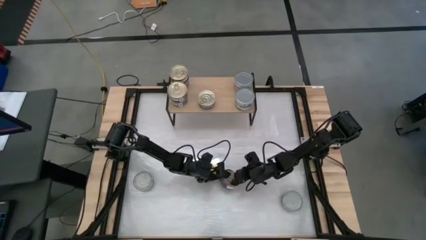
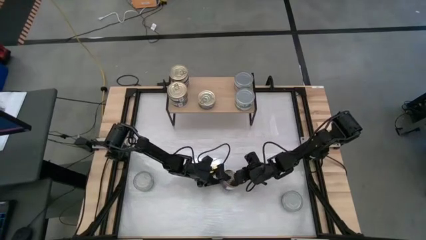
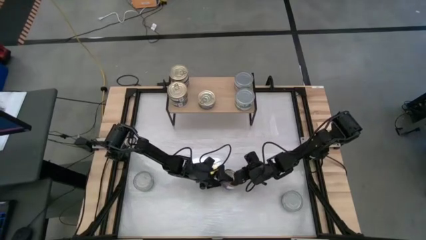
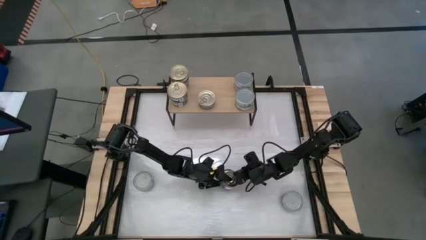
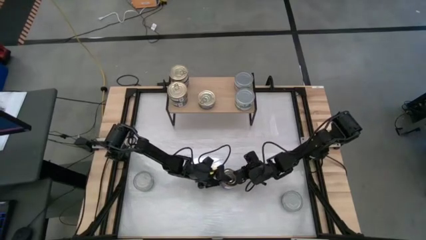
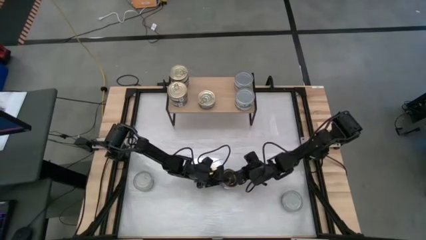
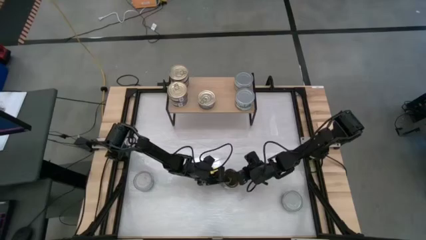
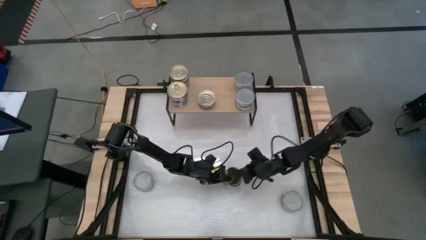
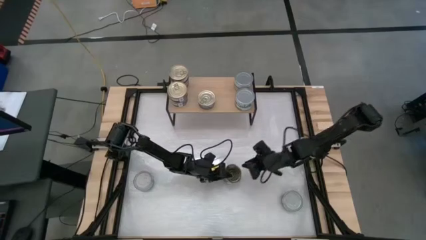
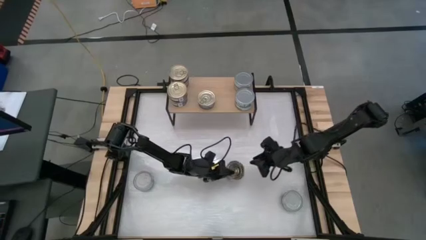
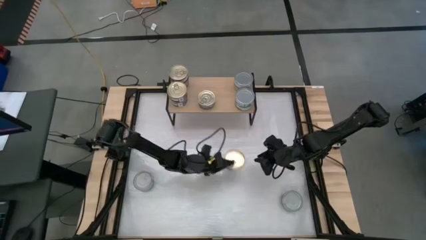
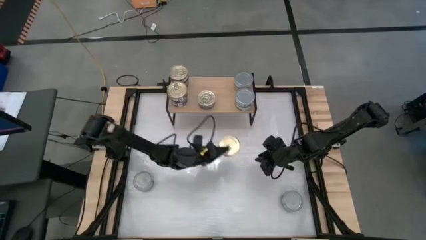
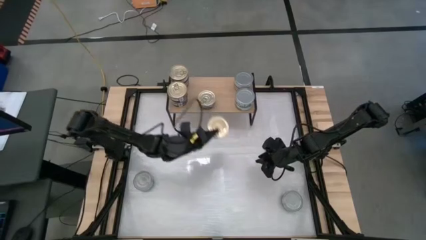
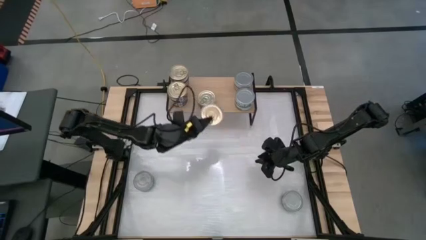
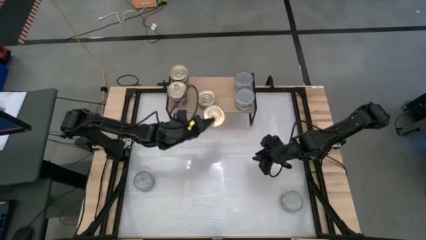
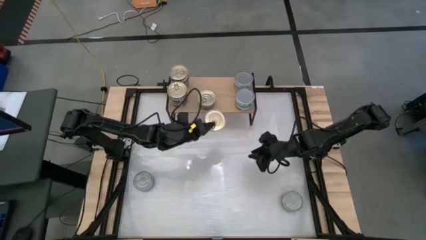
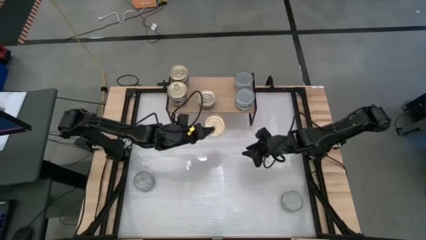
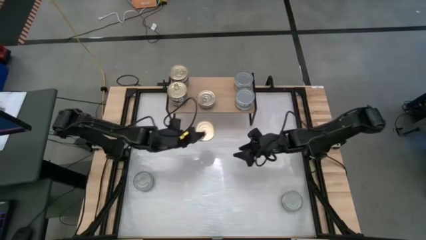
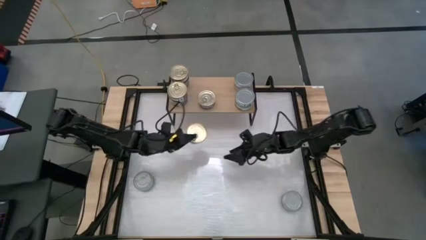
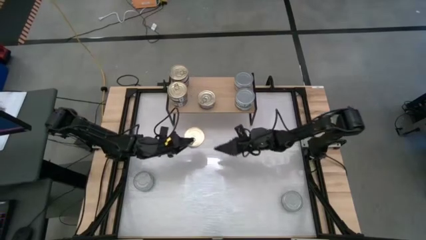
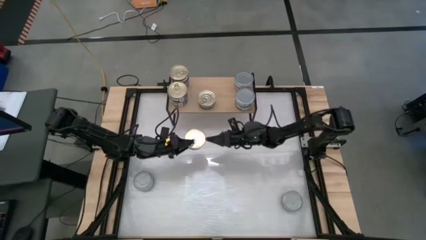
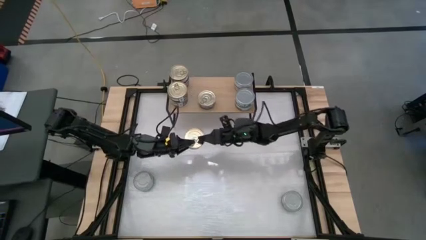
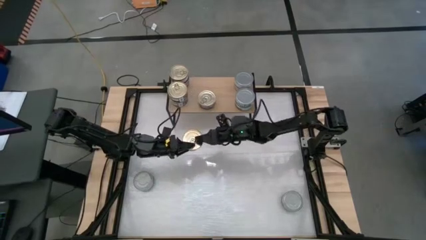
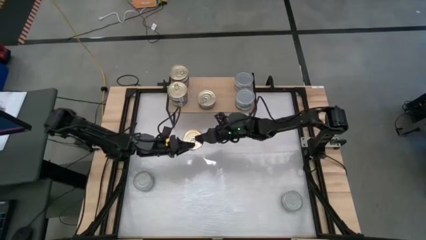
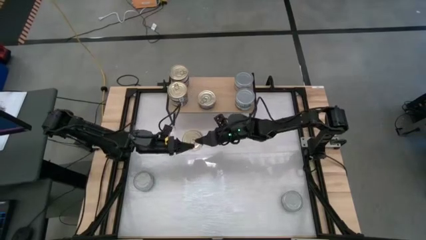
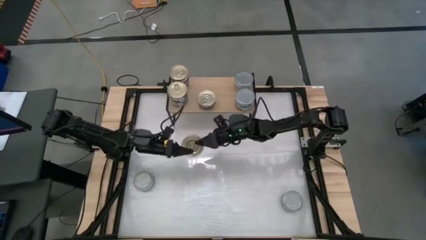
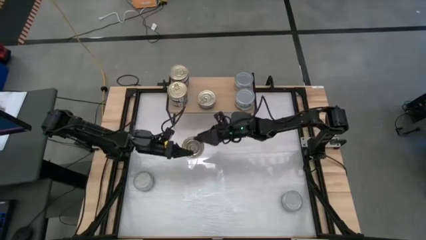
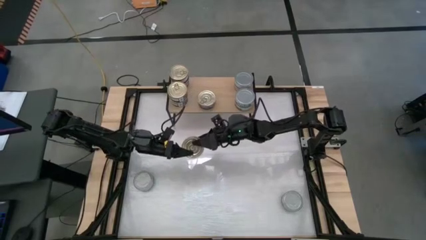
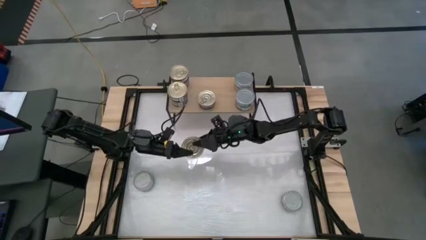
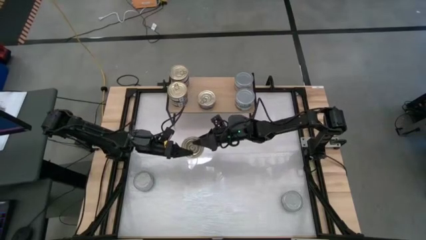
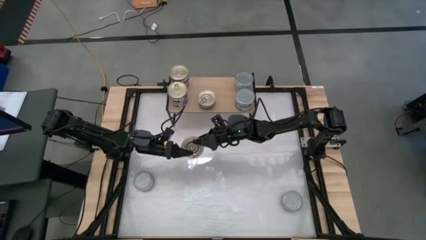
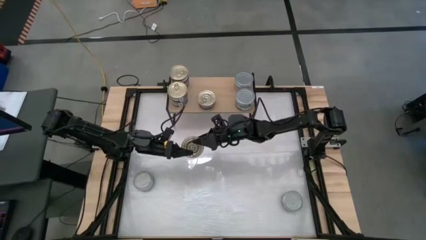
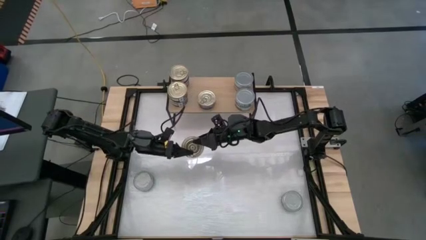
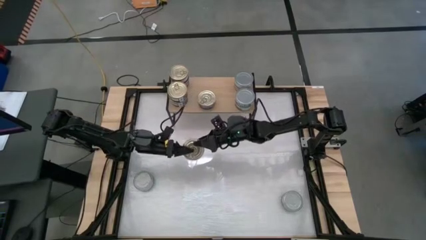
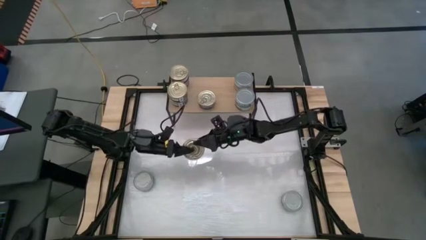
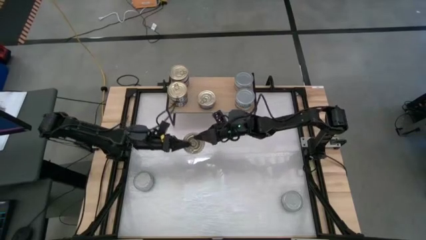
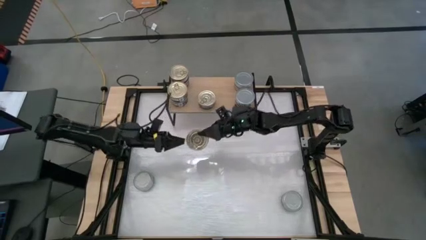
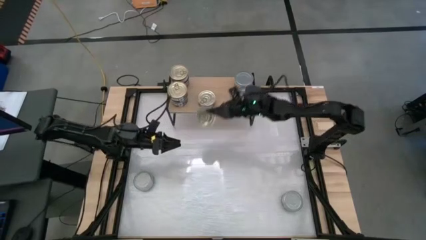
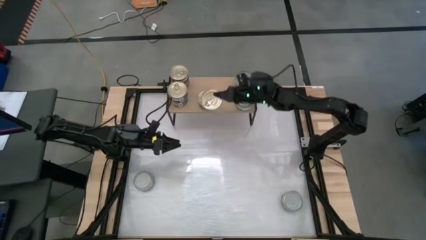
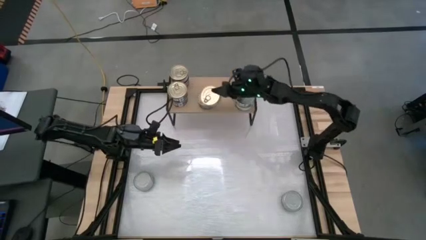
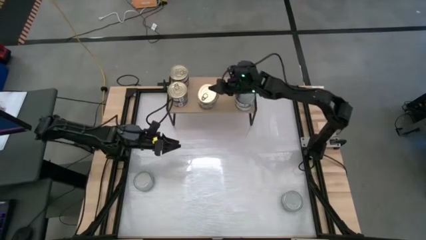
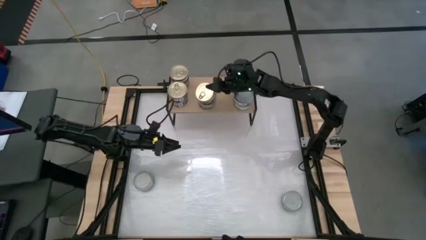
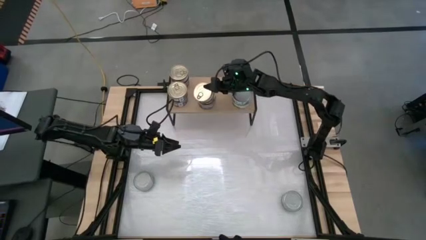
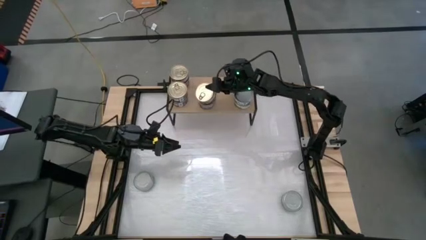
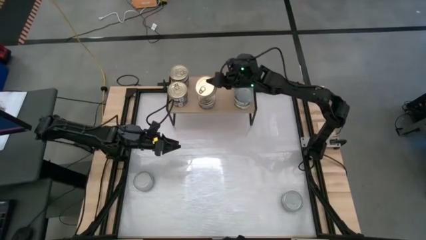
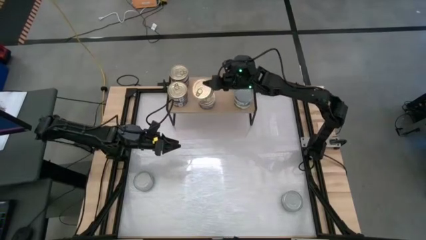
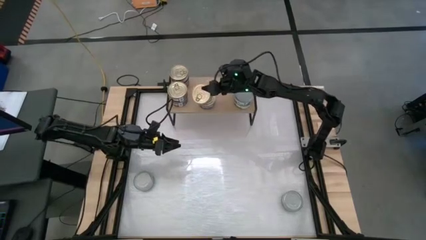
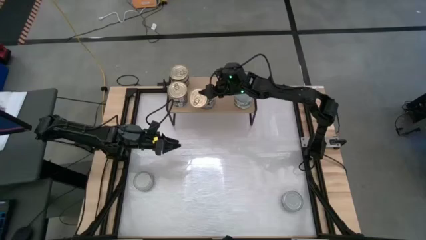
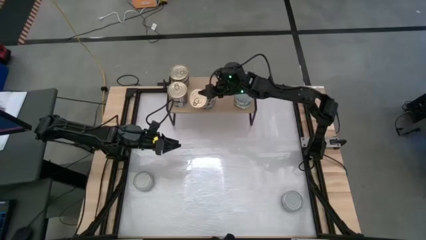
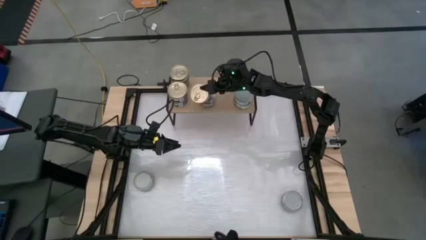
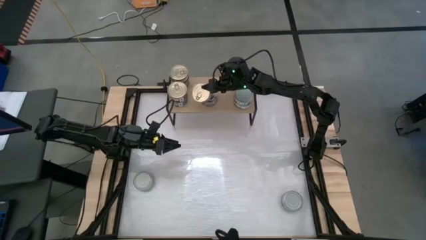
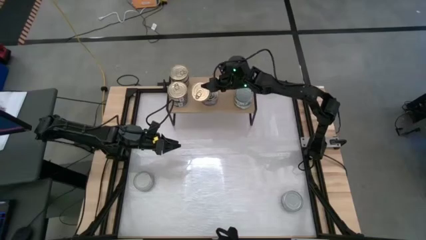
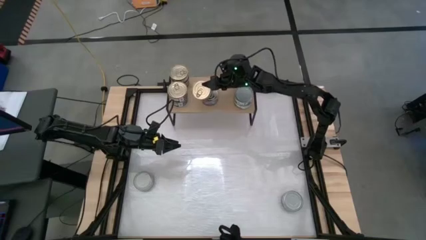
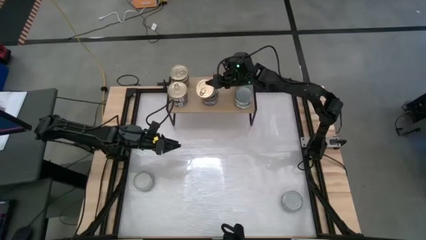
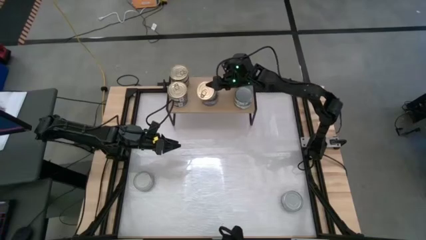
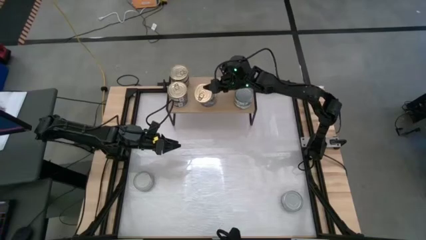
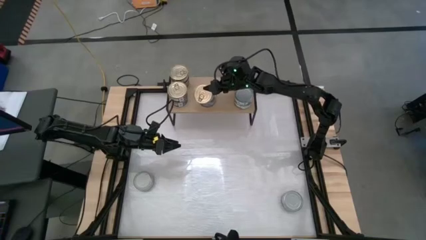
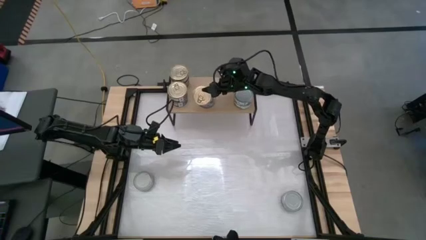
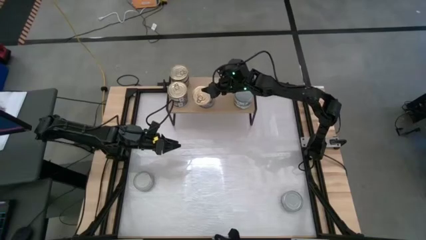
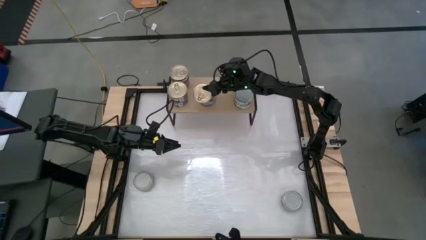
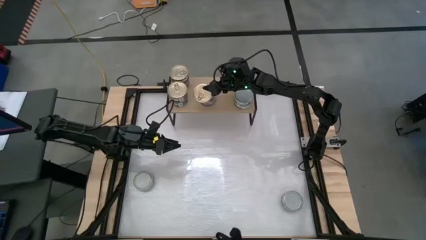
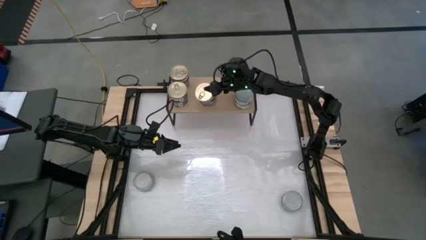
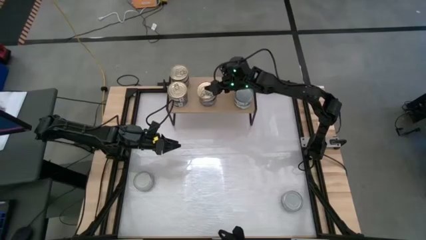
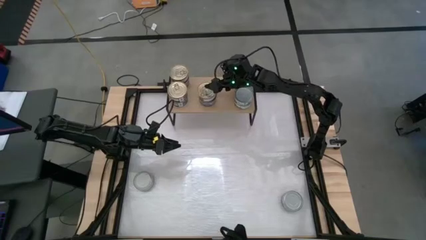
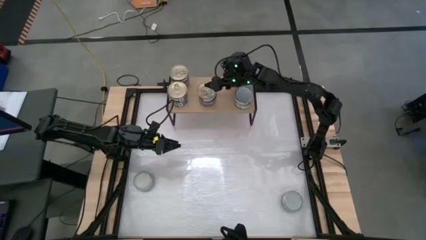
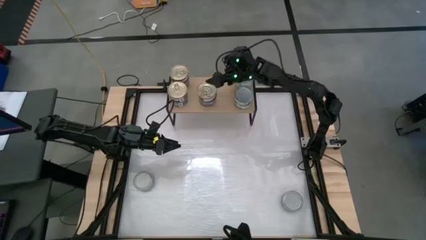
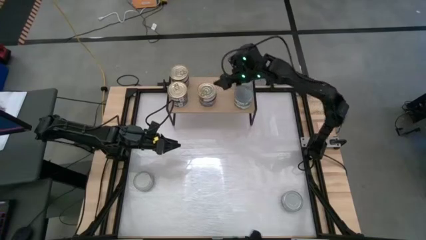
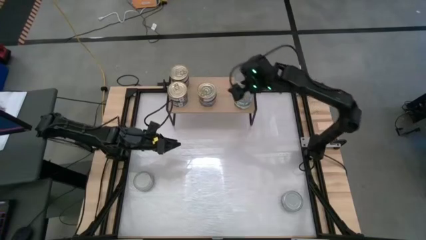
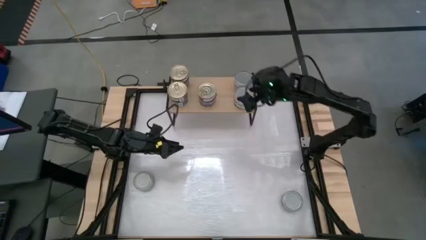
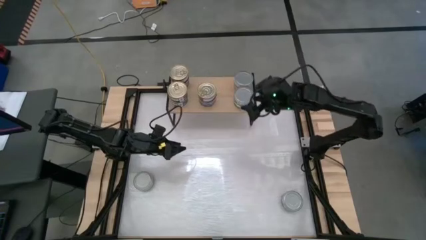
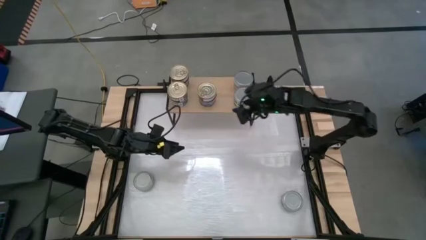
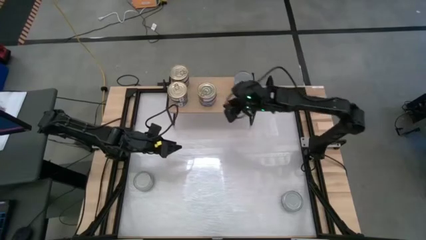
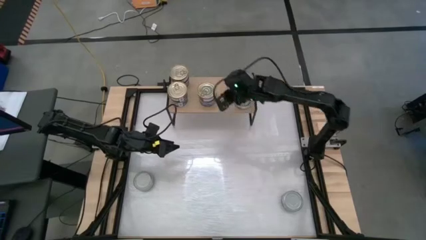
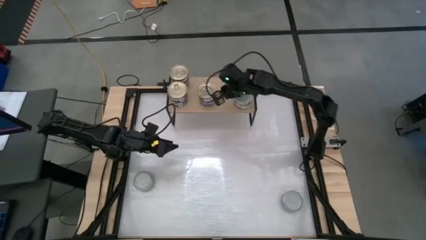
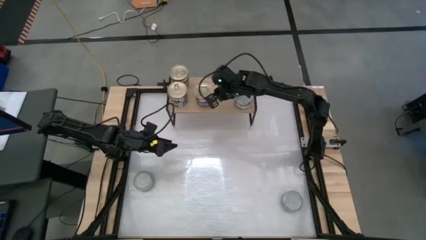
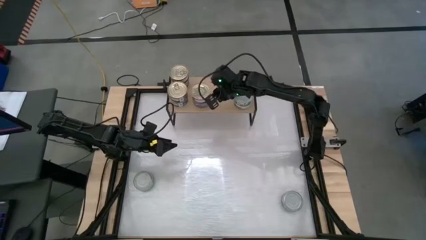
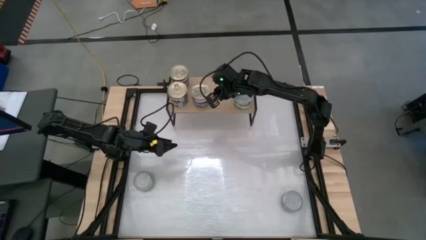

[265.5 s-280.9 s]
Task: Stack canned seafood by type on shelf
Stack the blue pink tuna can on top of the other blue pink tuna can on the shelf
